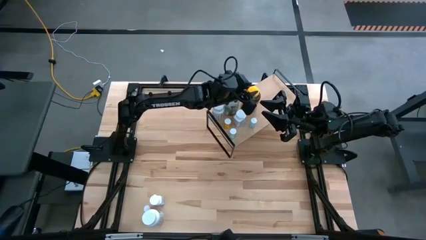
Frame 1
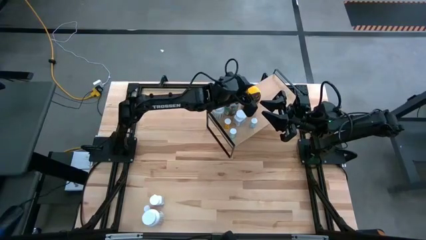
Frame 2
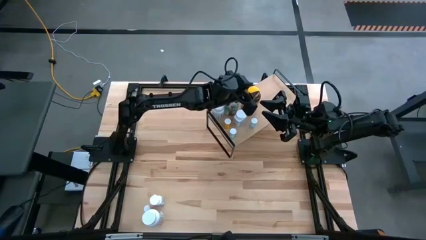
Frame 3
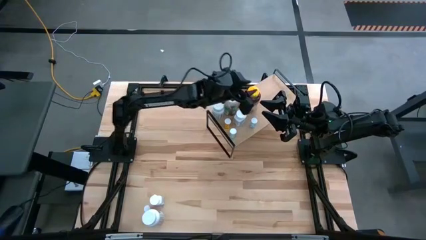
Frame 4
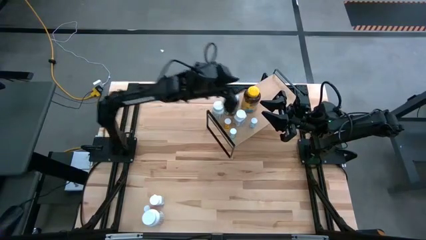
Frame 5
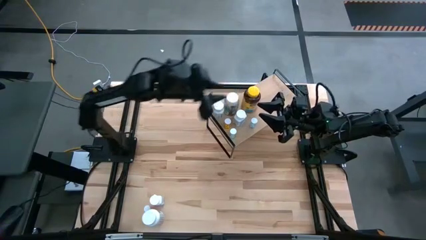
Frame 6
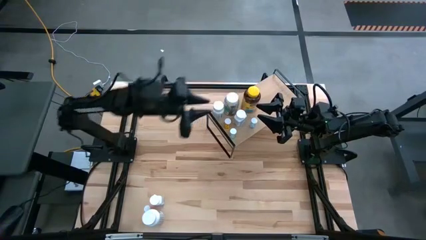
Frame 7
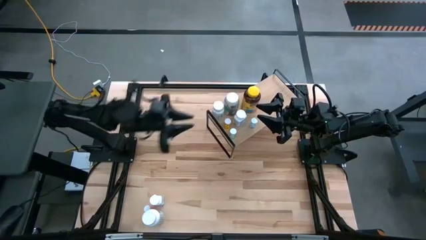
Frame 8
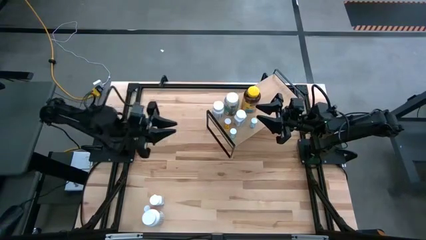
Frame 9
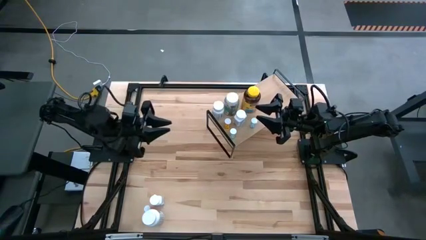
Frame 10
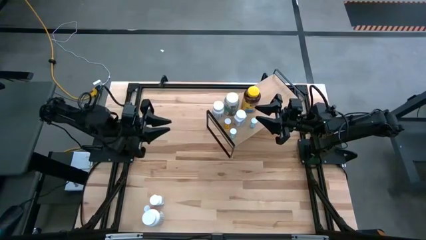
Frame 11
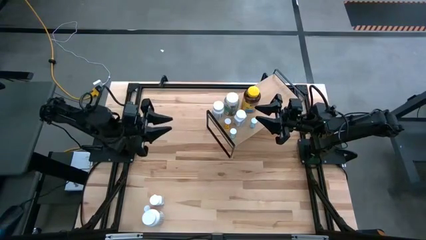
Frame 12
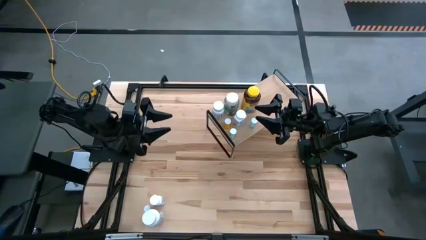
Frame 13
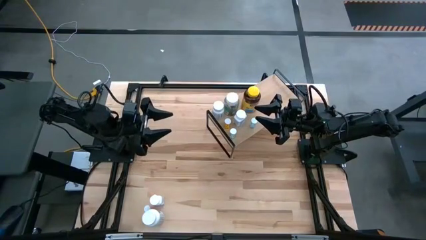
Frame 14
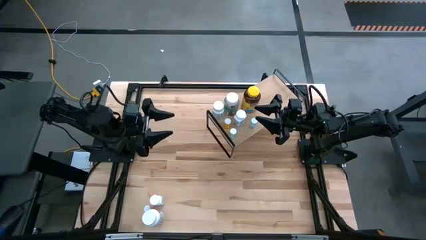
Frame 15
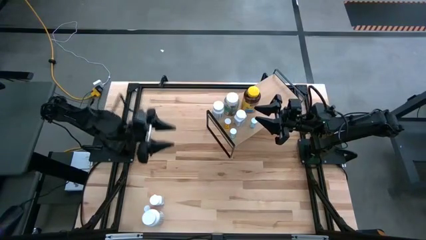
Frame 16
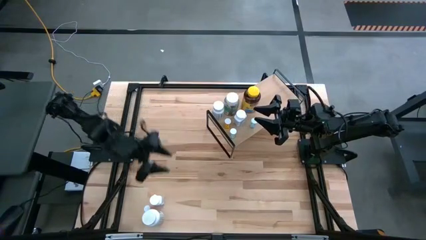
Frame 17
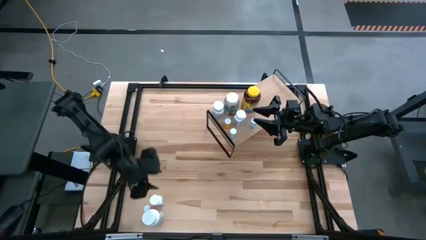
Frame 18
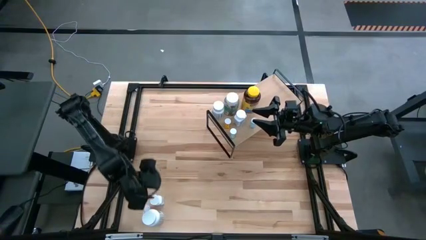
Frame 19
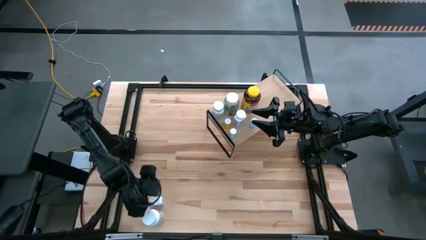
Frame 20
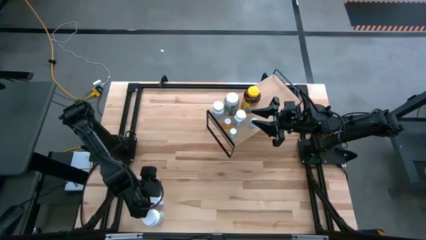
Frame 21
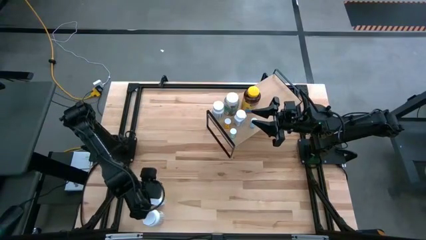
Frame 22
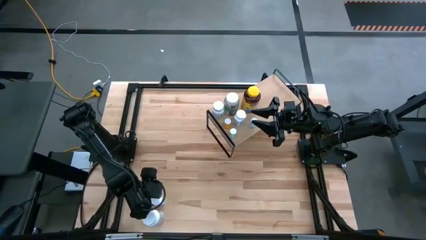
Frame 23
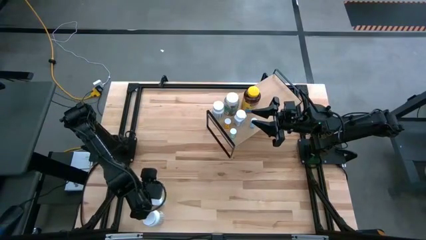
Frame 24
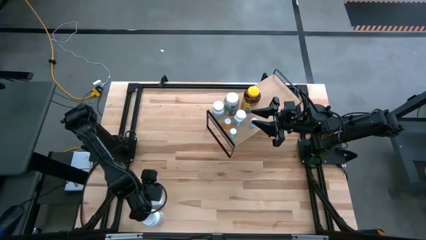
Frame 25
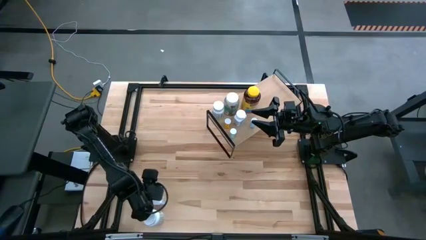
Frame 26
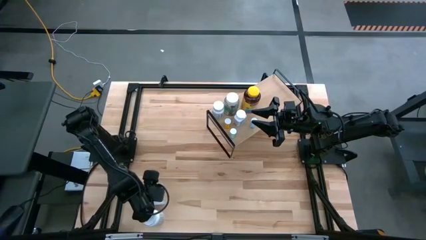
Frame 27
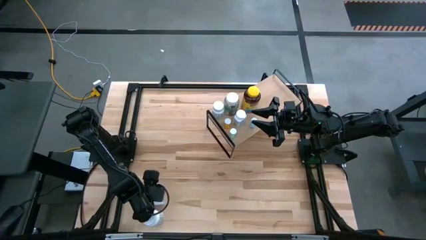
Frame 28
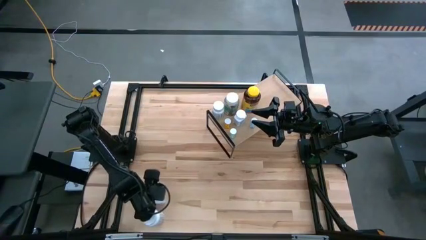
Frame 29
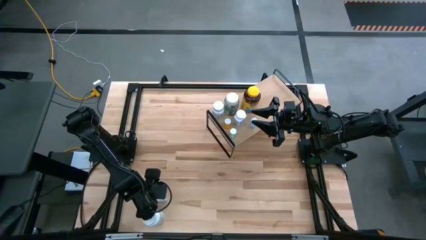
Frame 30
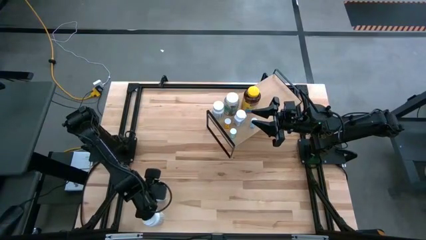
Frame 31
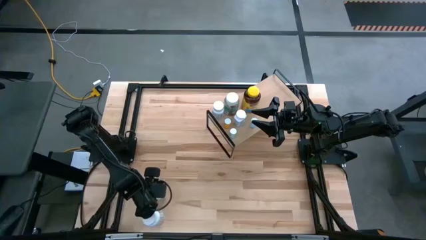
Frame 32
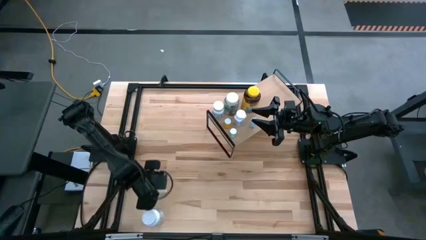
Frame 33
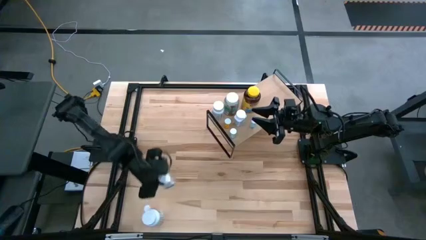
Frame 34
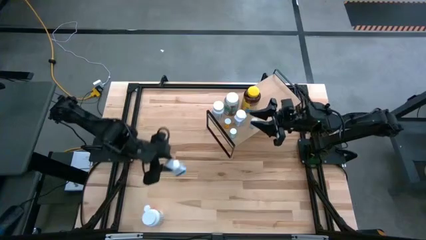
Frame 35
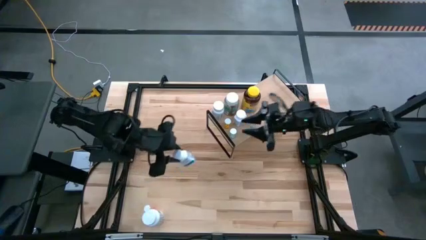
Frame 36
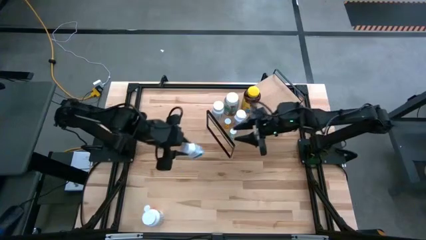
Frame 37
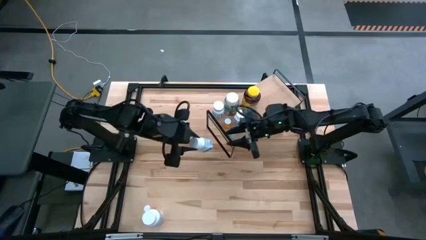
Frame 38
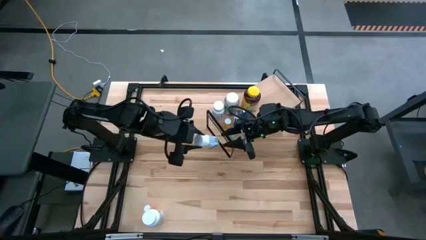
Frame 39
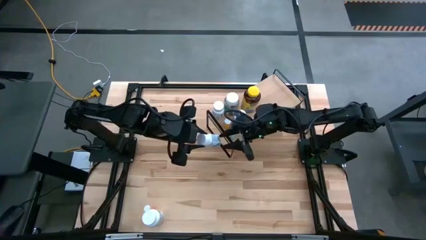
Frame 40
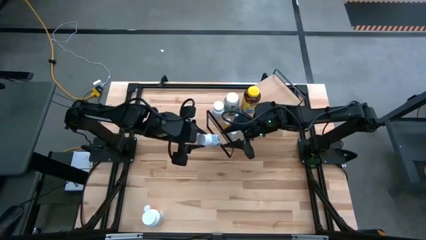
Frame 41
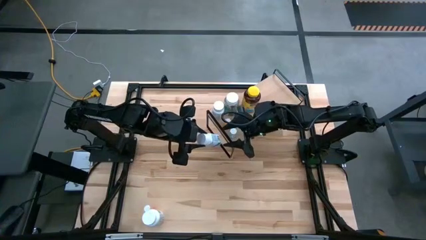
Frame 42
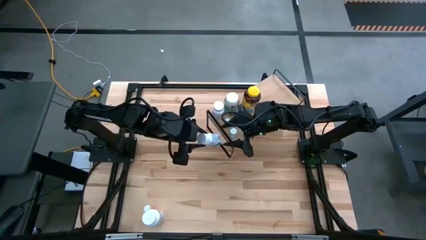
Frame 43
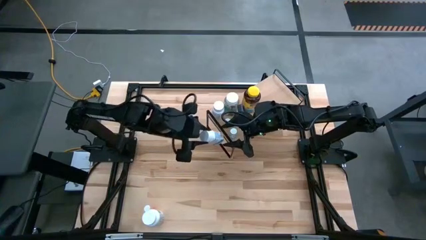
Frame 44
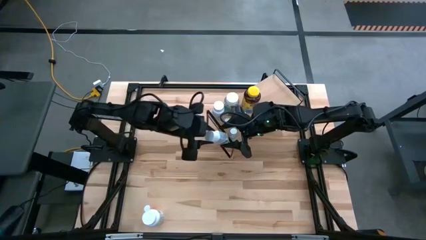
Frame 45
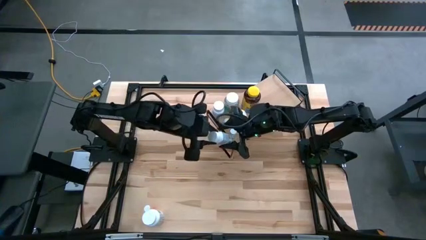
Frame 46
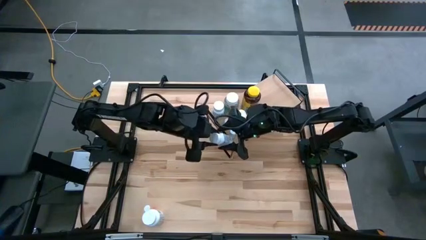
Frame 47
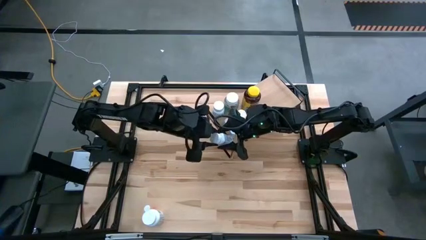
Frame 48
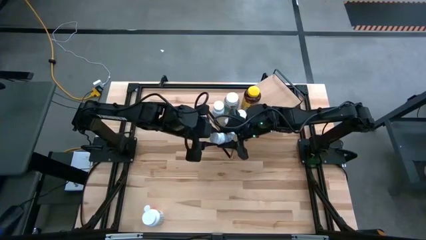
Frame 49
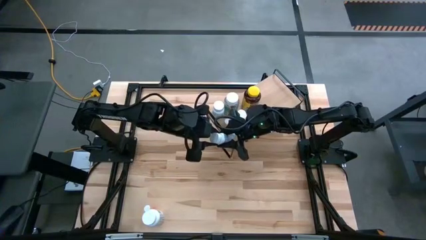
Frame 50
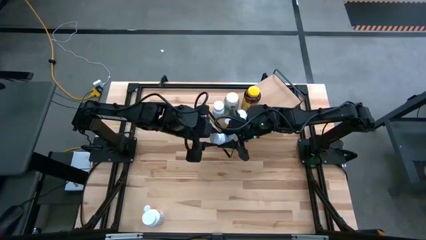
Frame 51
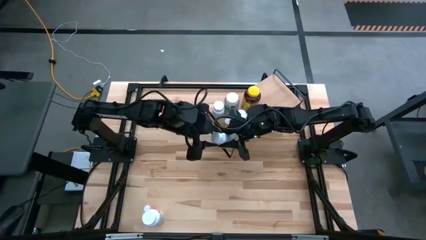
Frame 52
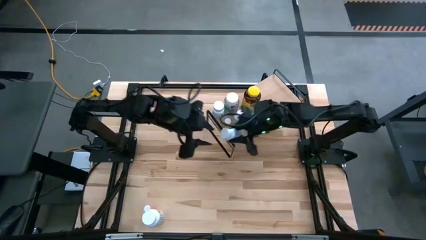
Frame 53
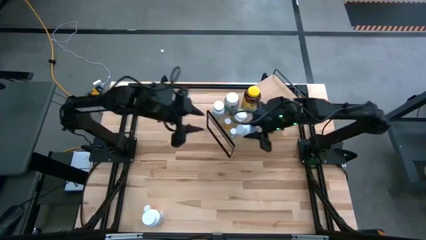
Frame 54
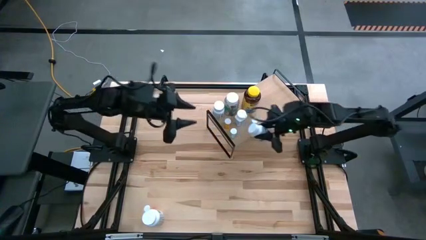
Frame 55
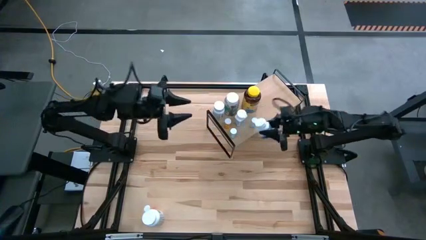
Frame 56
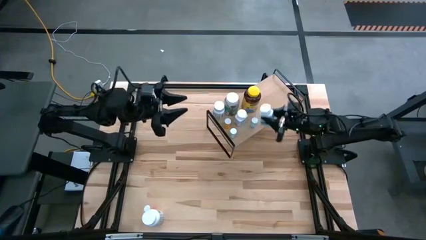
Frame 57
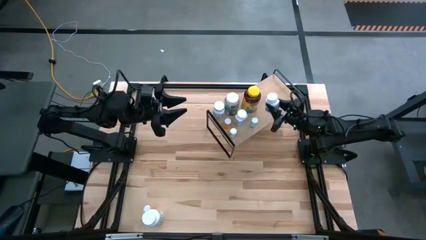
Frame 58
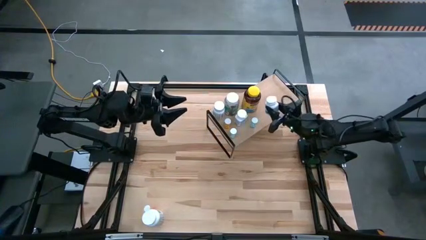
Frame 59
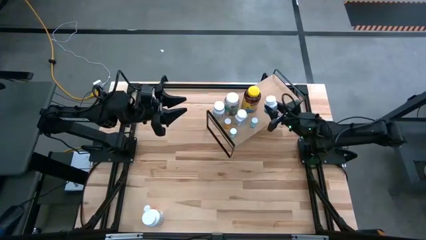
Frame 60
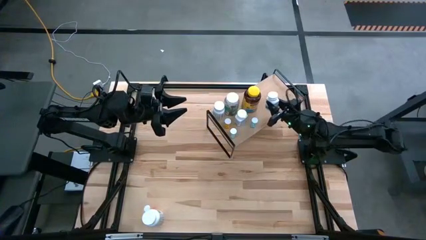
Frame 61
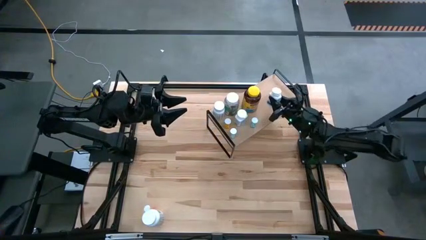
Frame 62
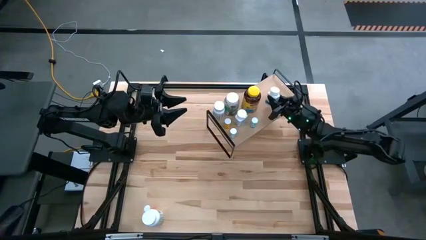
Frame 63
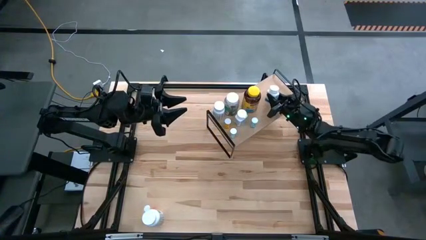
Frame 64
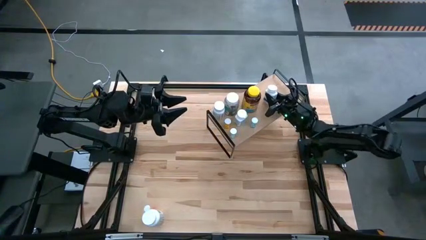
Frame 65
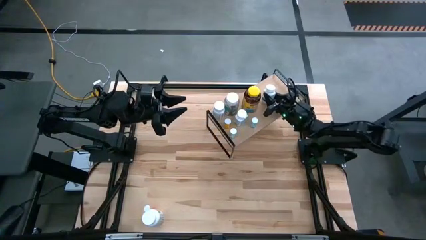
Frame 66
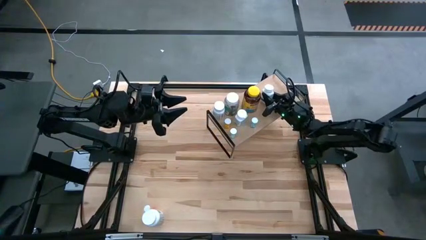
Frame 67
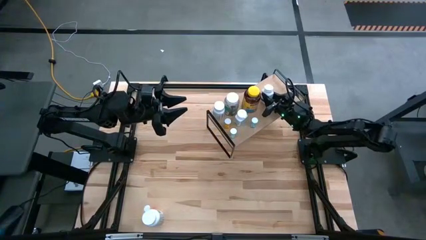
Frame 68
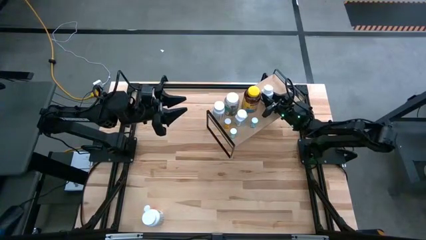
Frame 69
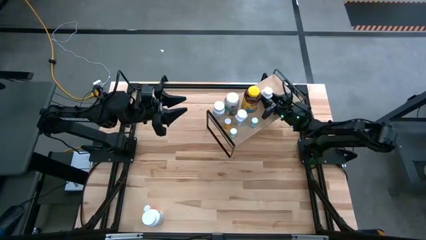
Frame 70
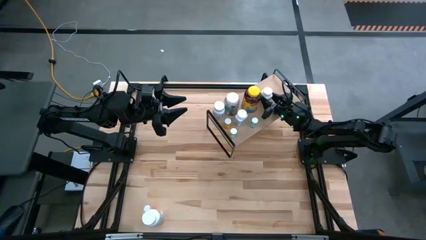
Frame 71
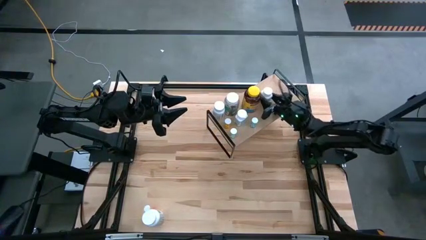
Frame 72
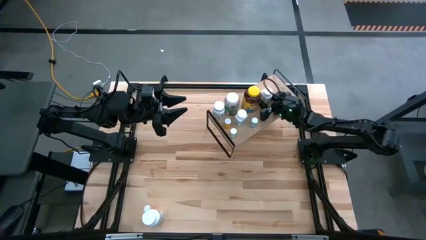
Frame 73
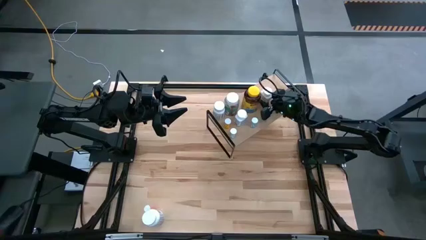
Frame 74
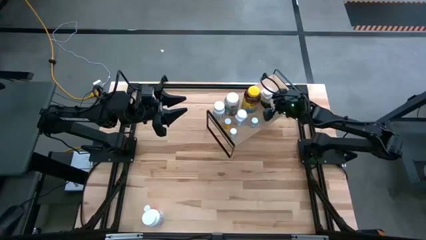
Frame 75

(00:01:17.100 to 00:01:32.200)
Task: Pick and place medicine bottles onto shelf by color
Put the small white pill bottle on the shelf

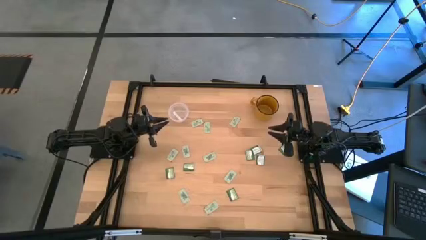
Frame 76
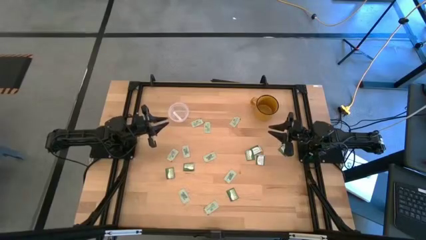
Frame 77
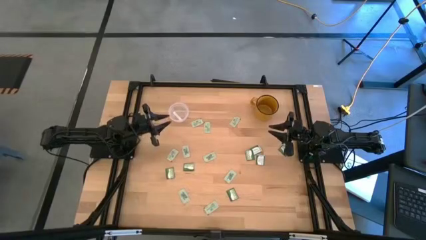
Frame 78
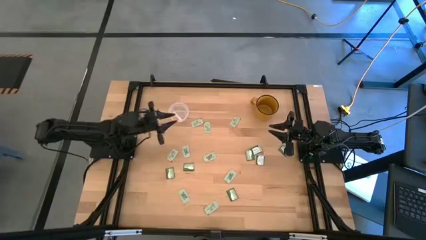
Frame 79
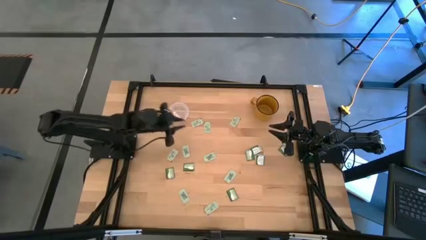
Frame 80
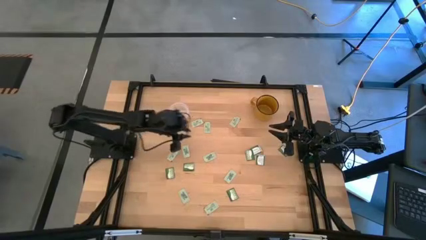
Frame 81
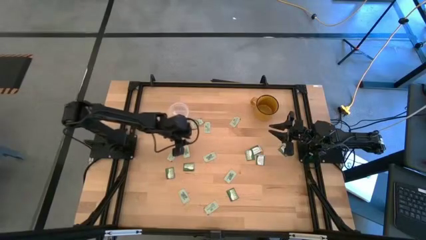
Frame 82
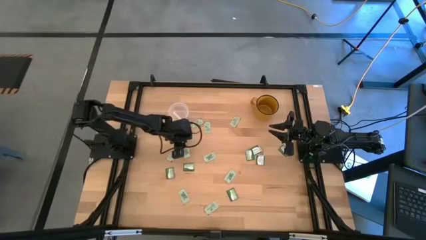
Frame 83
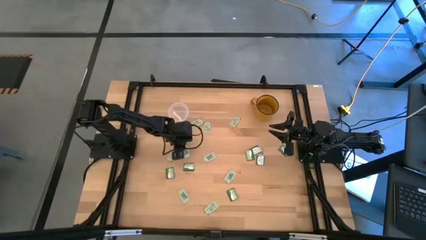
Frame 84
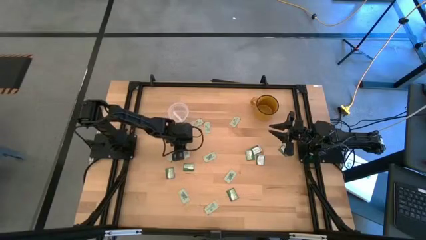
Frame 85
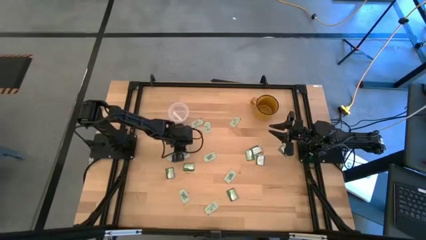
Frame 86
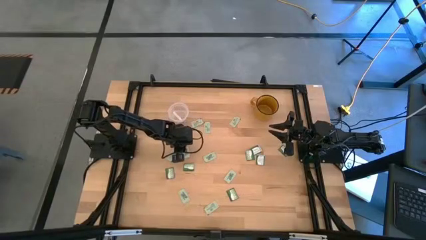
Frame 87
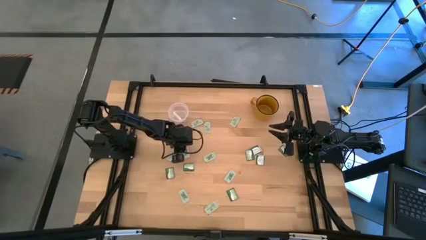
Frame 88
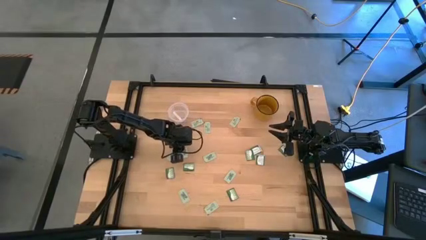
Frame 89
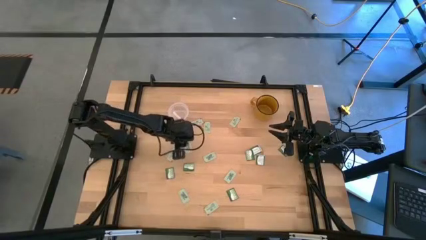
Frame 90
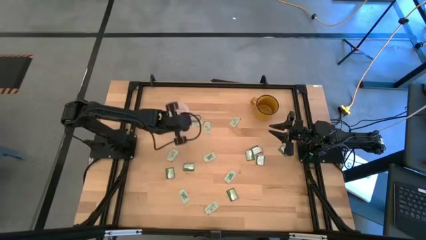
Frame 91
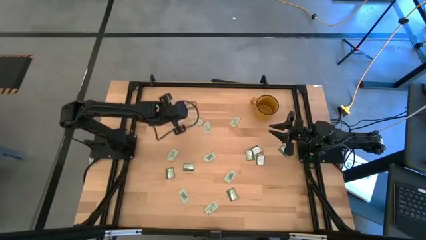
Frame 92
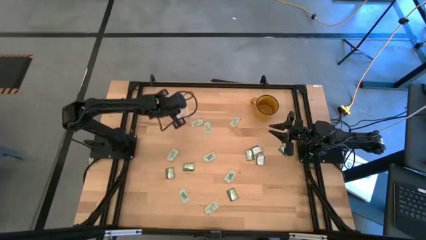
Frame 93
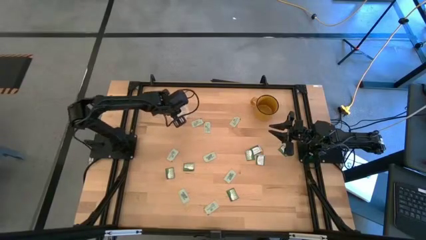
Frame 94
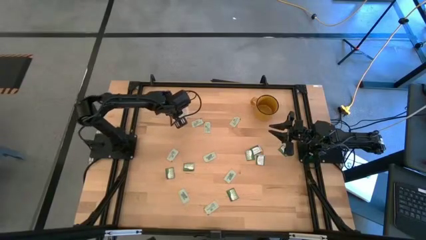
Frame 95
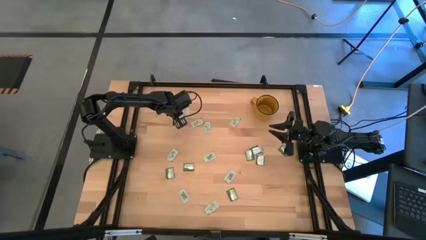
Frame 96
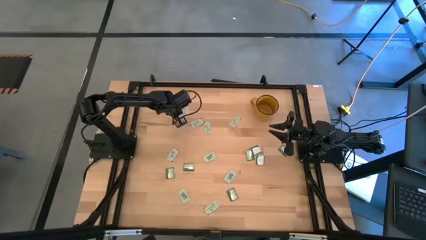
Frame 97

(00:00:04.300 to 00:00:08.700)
Task: Pick and place Stevia / Truvia into bins
Put the stevia packet into the transparent container
